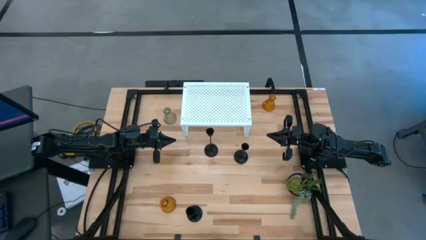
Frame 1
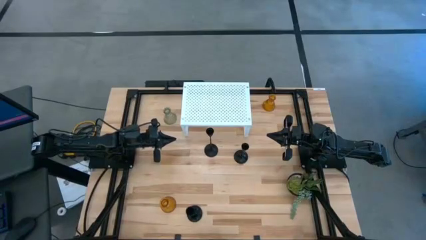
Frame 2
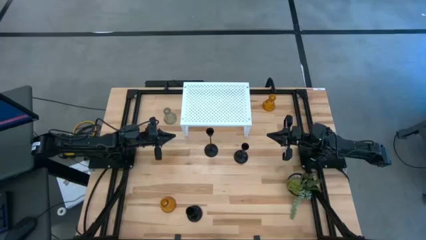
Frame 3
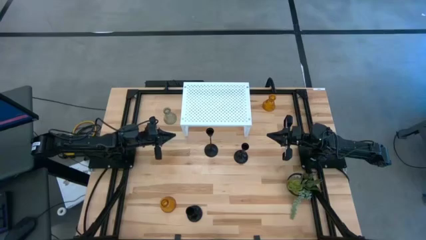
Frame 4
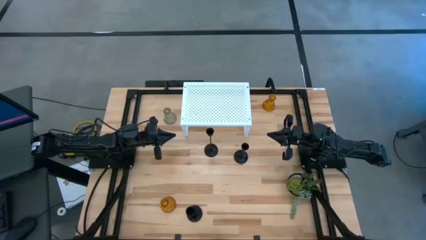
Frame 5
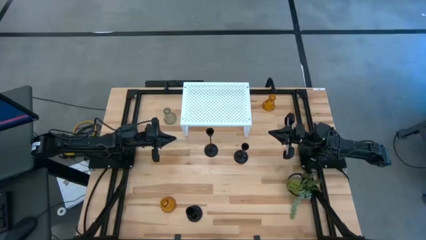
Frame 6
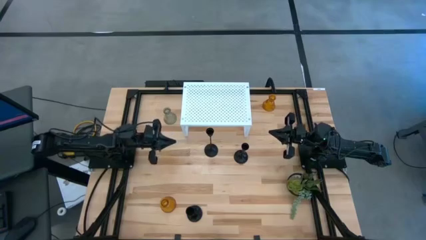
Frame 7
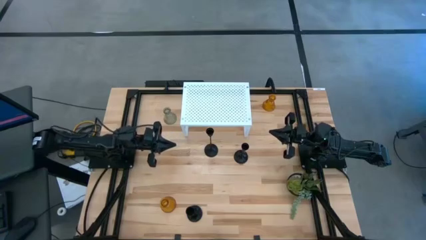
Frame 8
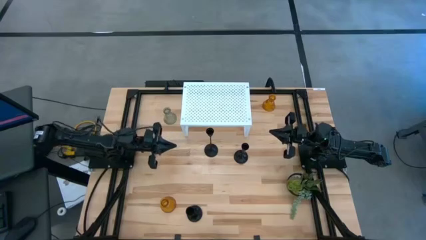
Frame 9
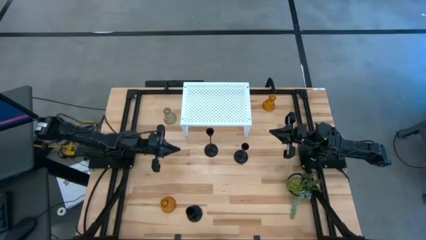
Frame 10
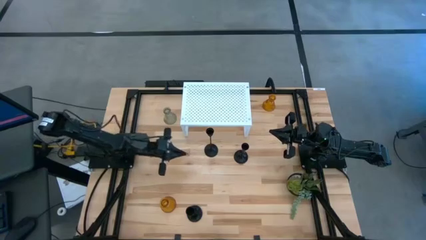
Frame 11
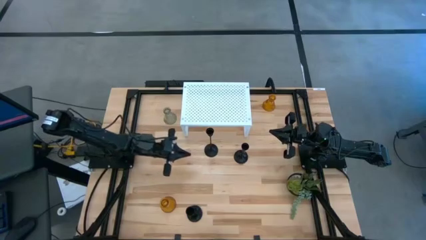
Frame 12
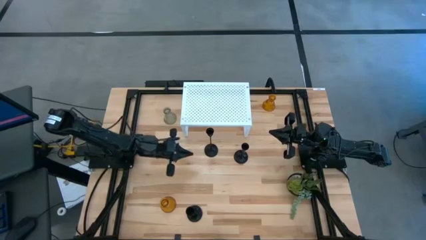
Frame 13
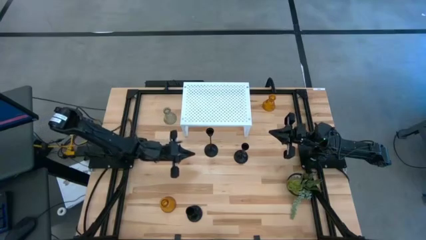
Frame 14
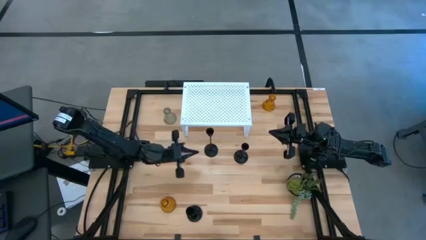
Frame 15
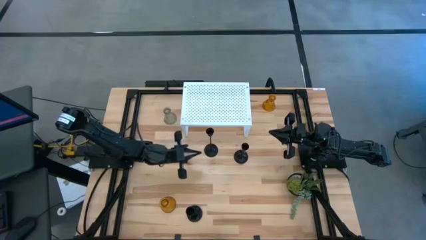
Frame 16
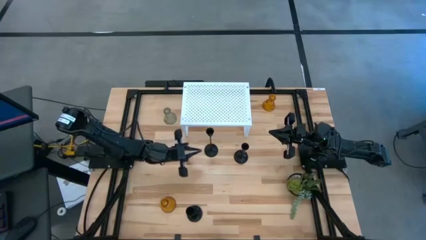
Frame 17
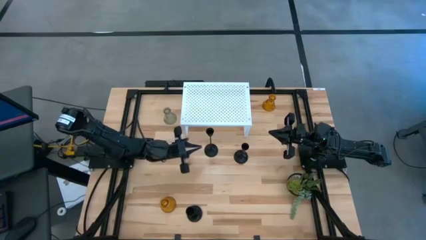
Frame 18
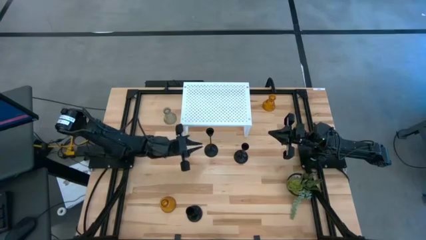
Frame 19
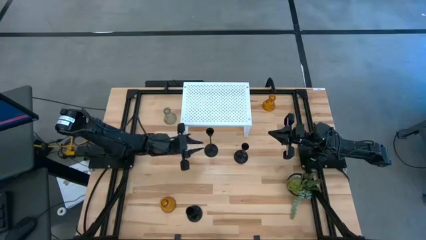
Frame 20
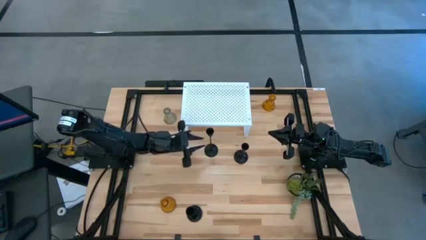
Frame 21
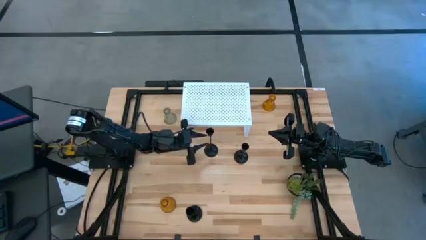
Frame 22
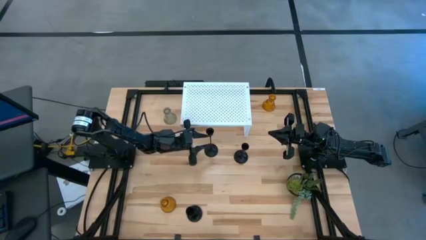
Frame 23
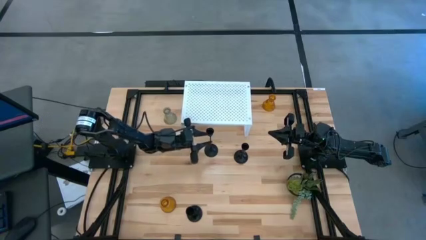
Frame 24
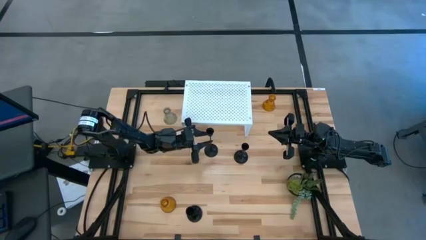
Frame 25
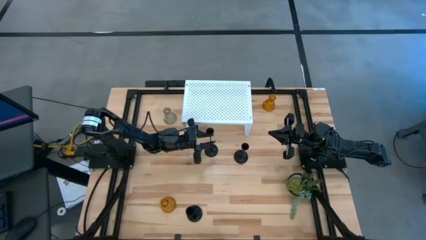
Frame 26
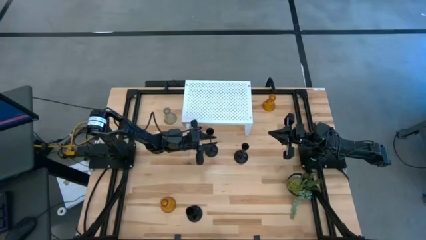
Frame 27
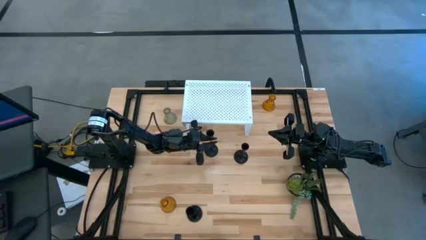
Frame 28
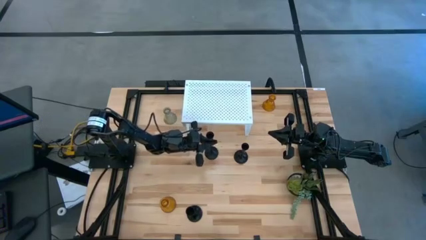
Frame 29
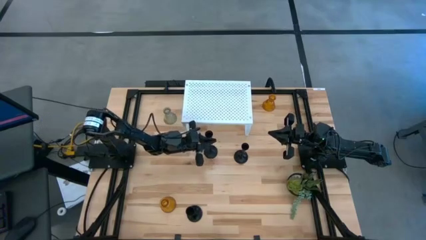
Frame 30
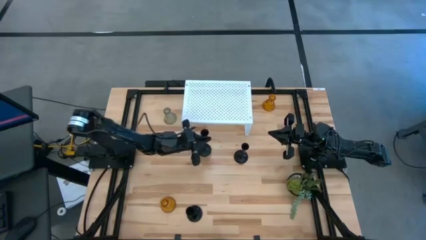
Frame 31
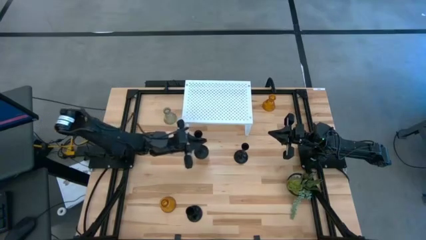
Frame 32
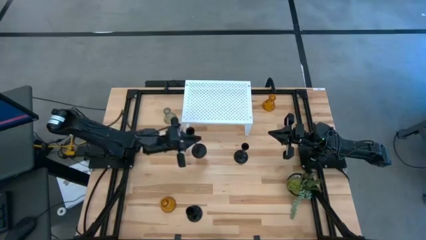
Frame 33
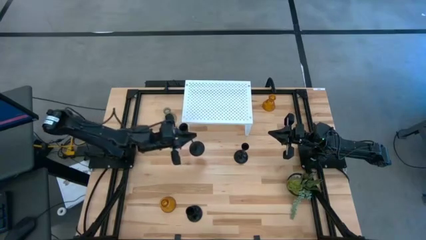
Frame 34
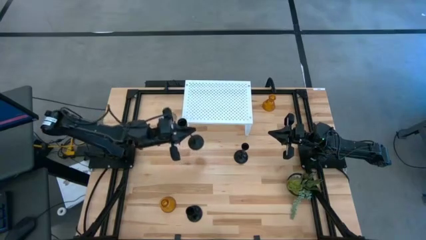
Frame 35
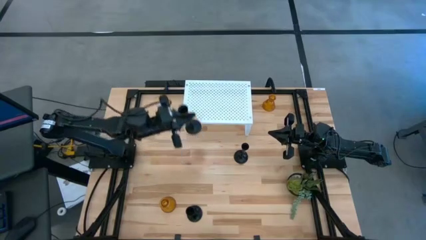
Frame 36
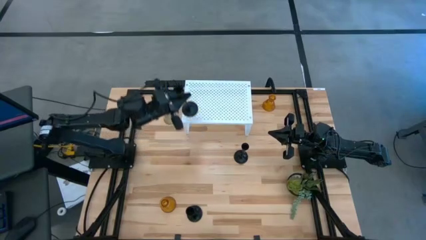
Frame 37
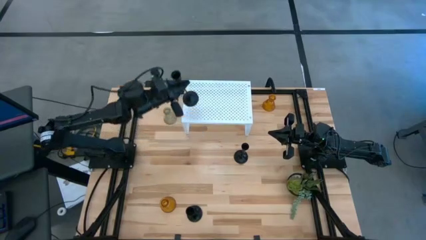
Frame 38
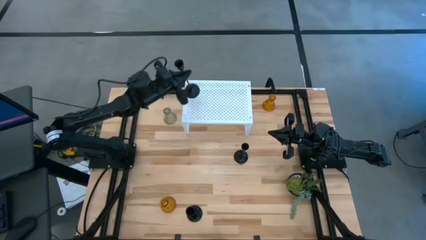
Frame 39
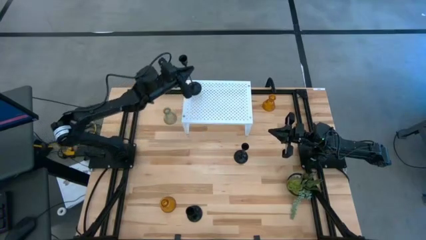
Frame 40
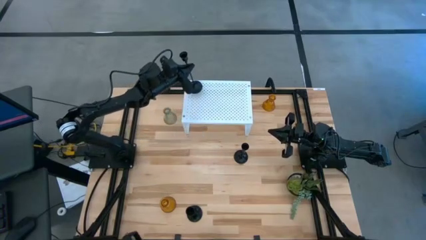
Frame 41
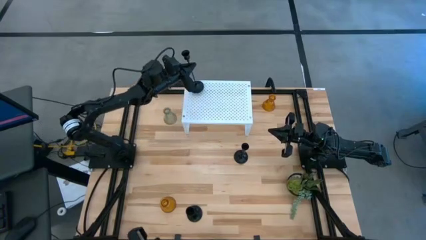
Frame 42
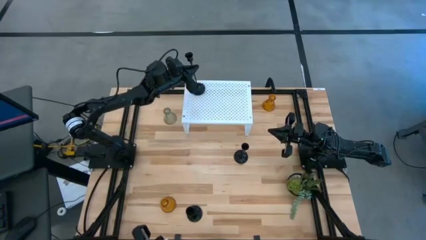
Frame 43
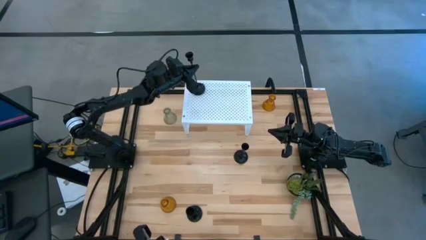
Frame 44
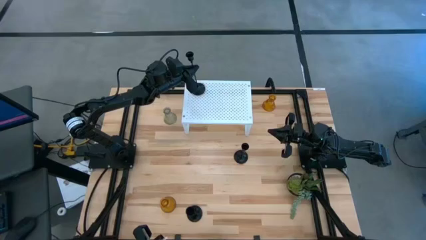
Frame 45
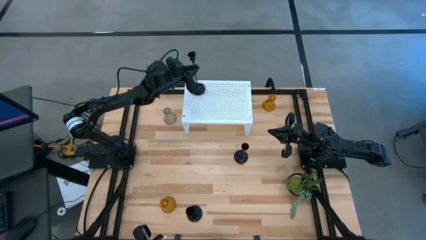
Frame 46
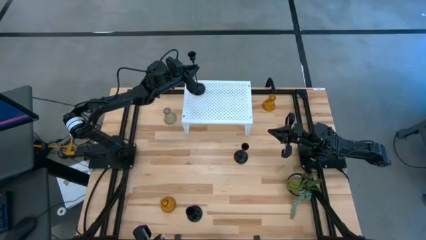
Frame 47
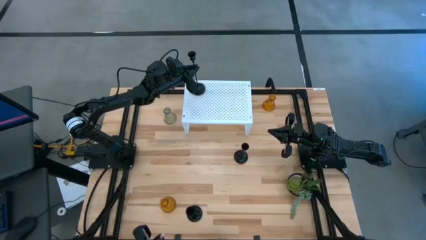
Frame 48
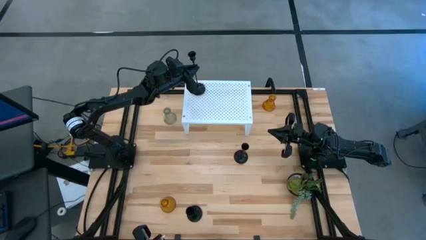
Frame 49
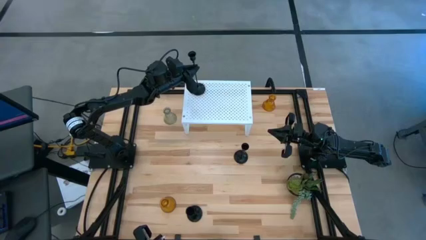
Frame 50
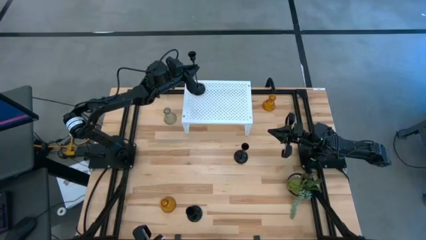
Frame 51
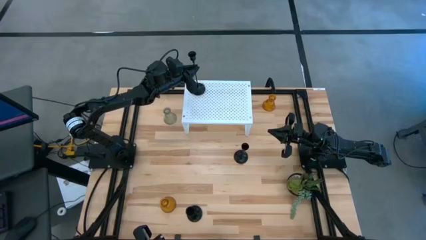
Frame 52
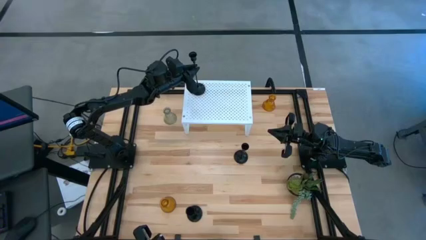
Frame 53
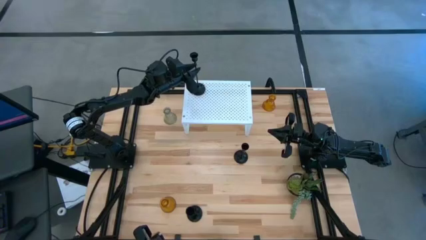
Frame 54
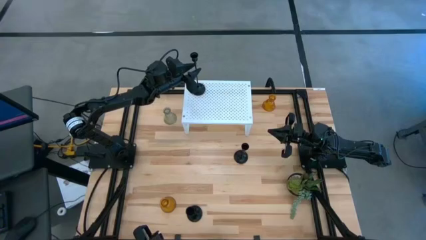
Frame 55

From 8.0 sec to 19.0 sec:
Task: Pick & Place candle stick holders
Put the top left black candle holder on the shelf
